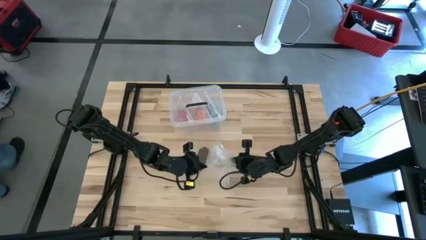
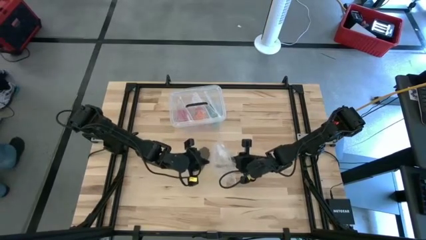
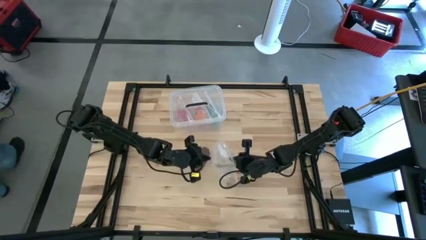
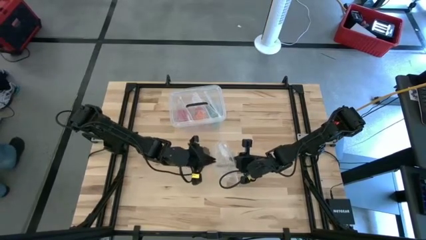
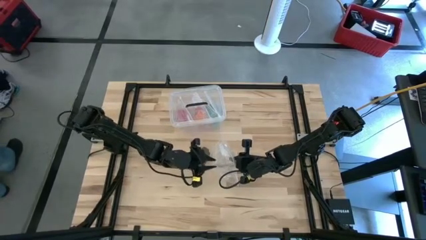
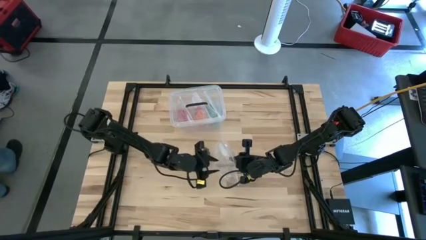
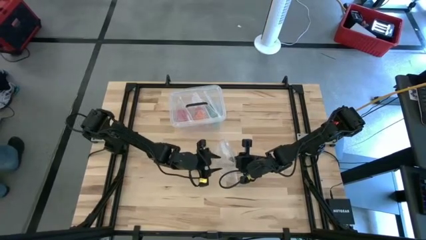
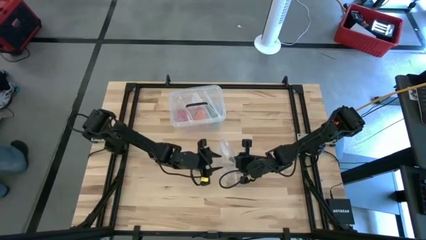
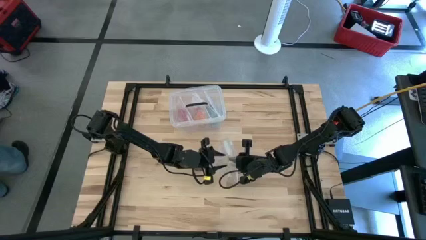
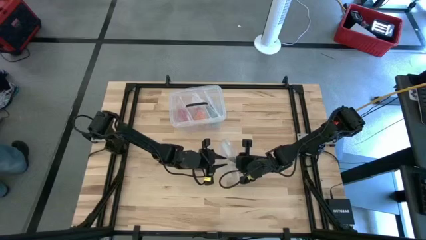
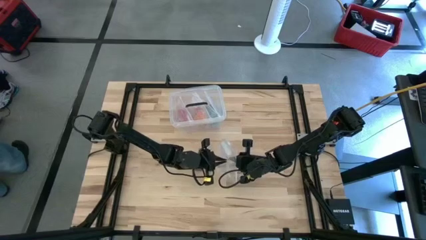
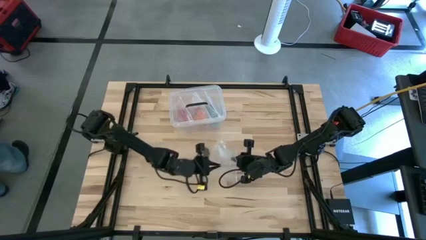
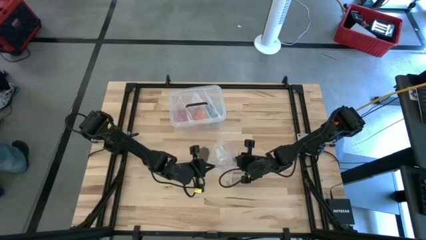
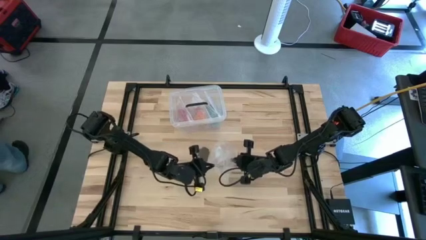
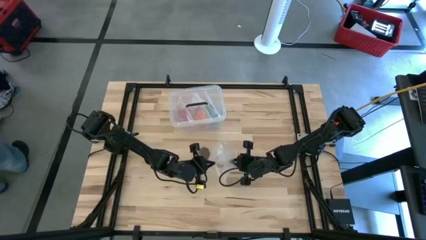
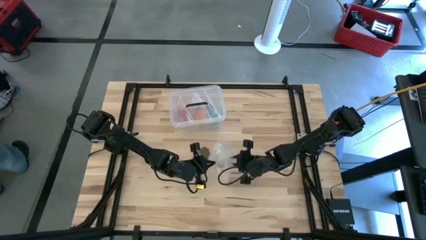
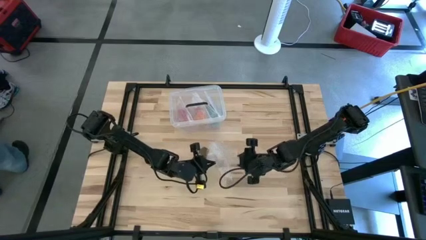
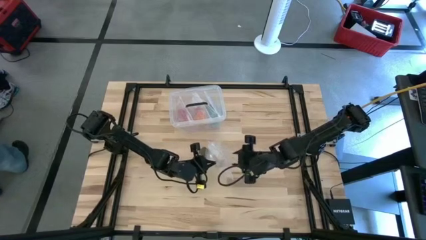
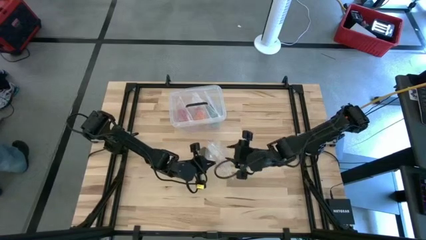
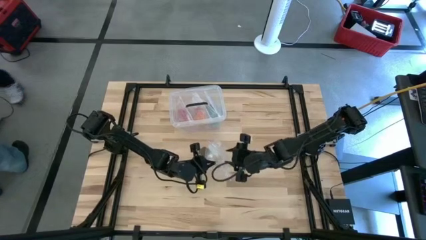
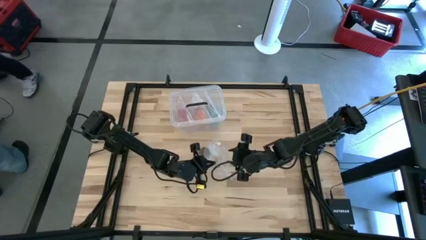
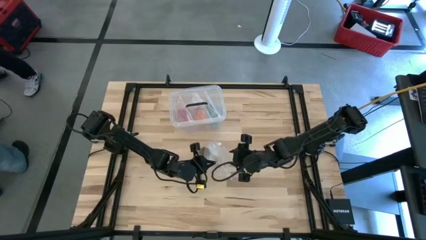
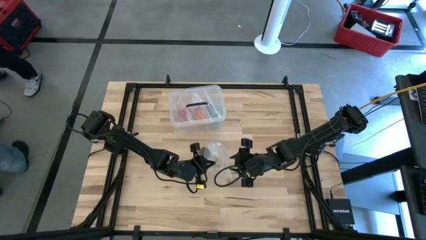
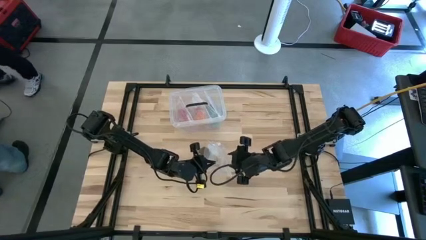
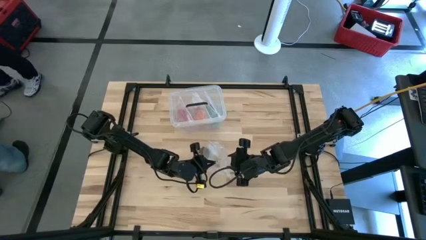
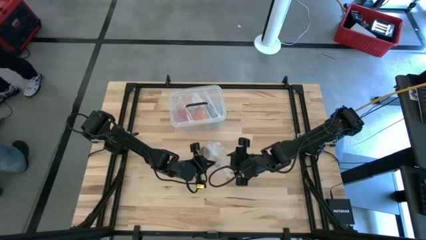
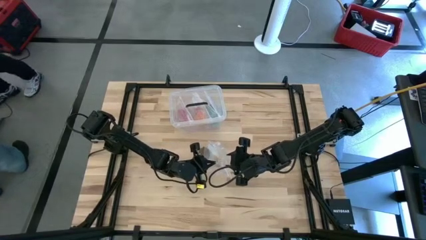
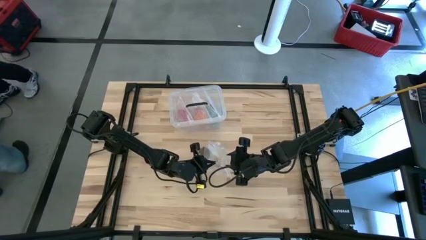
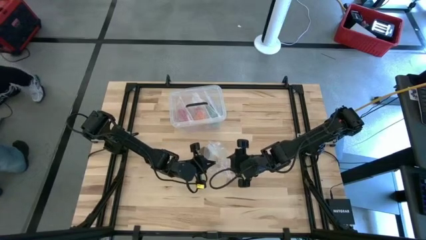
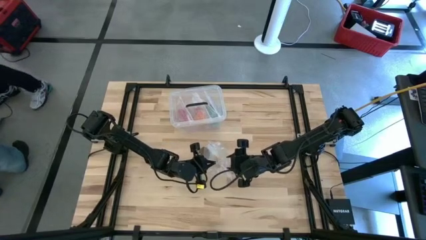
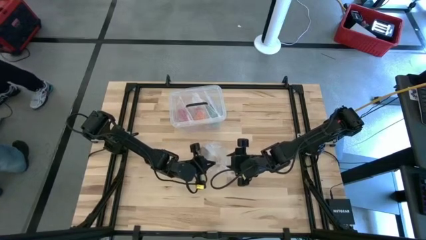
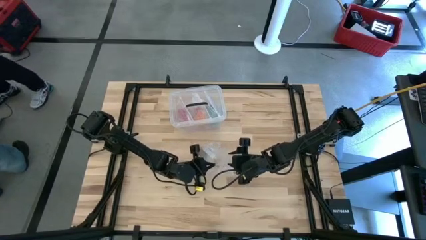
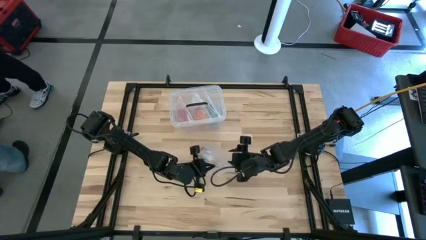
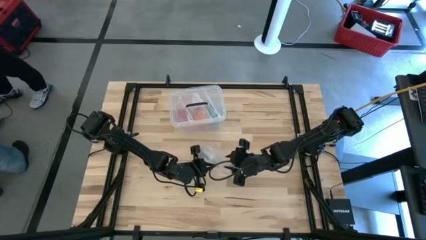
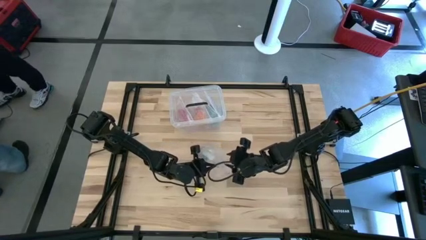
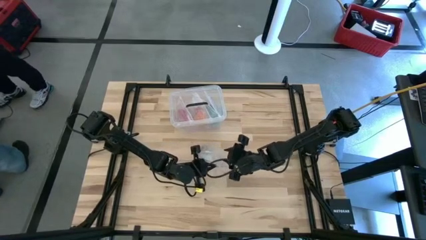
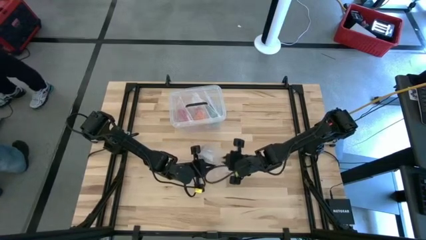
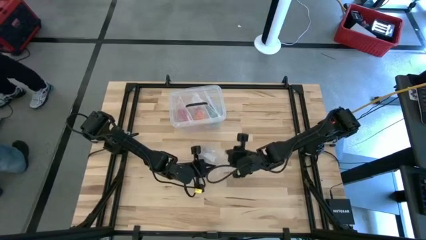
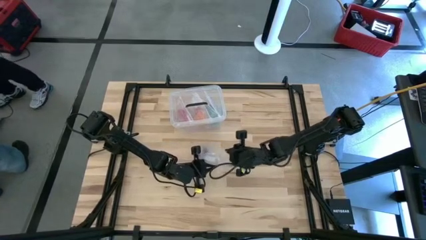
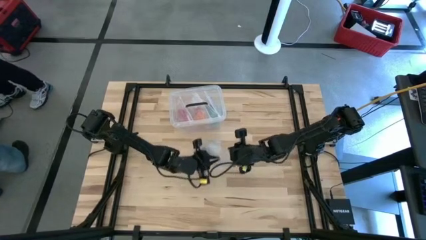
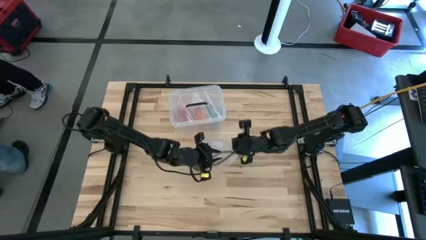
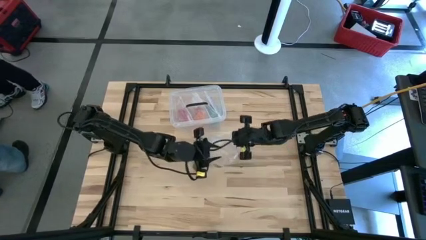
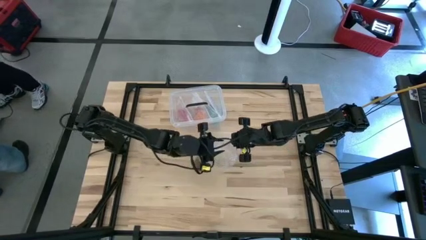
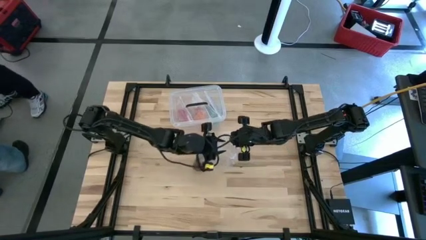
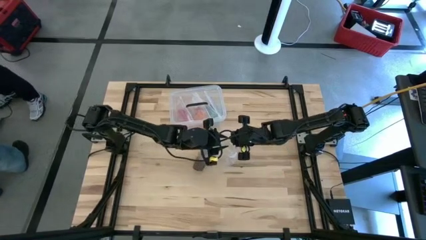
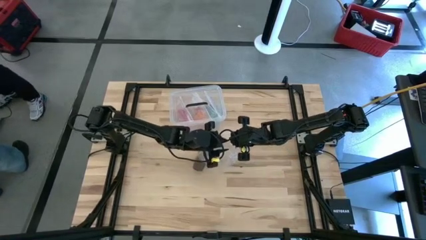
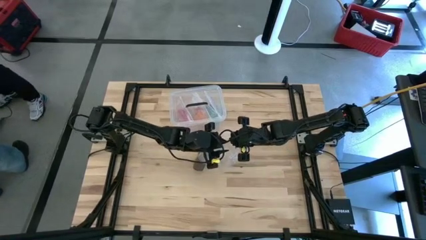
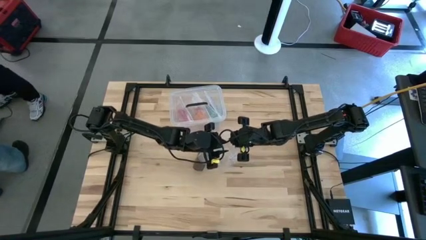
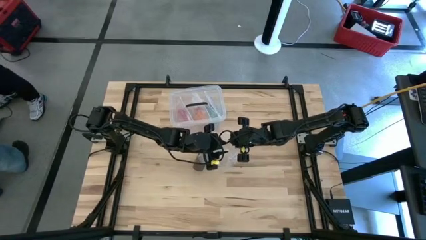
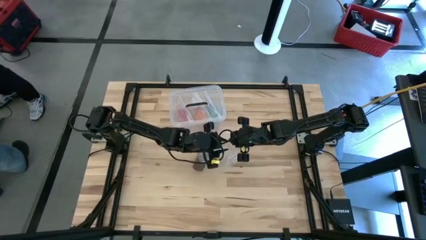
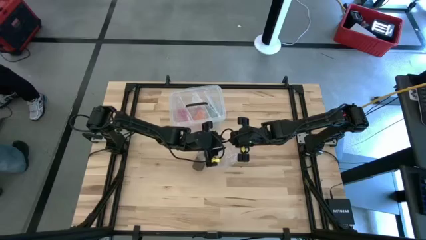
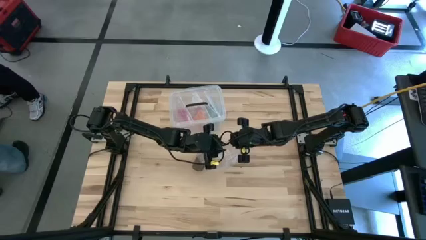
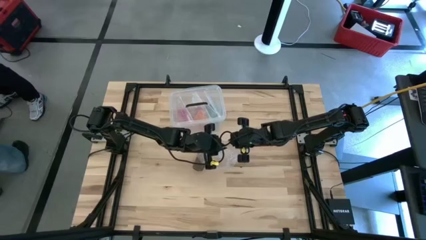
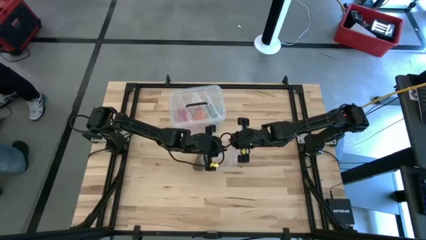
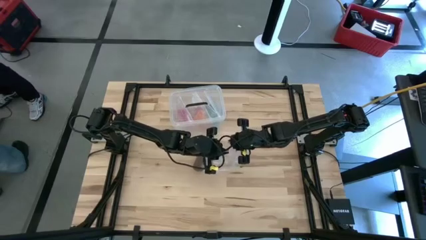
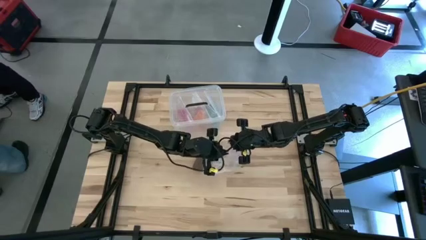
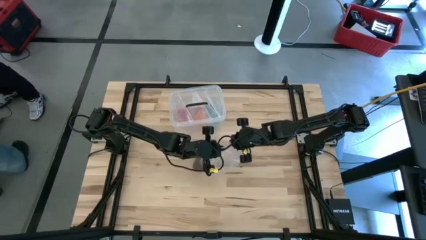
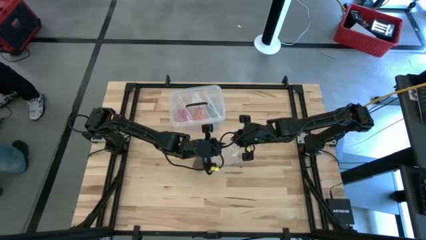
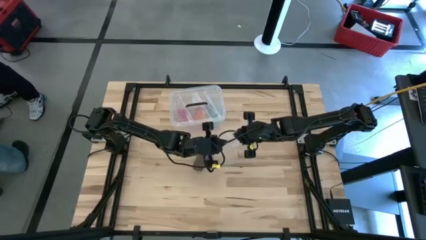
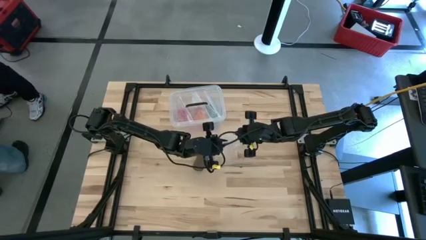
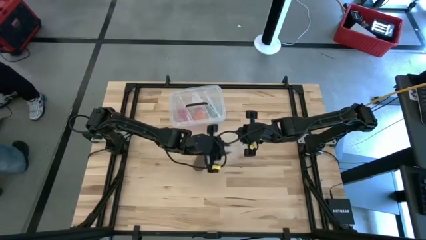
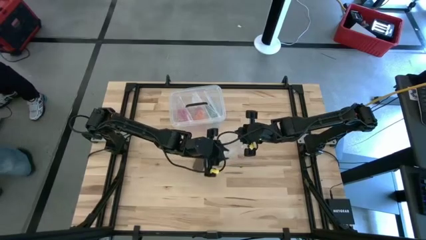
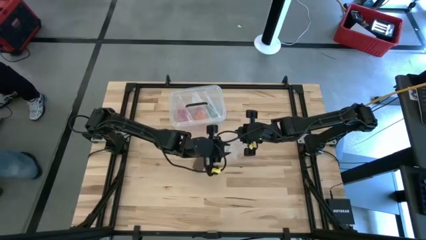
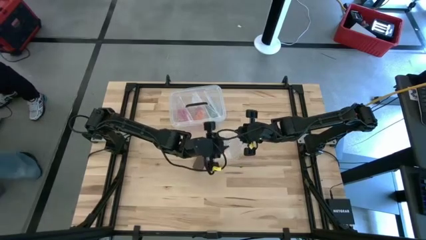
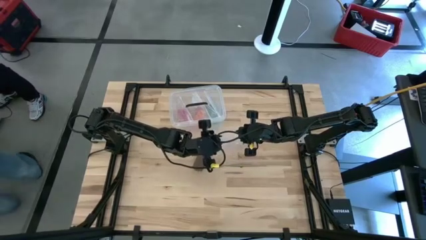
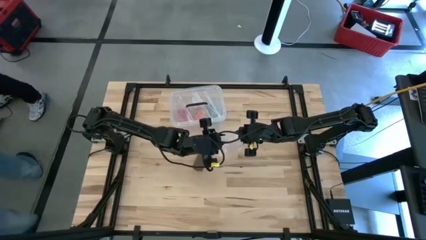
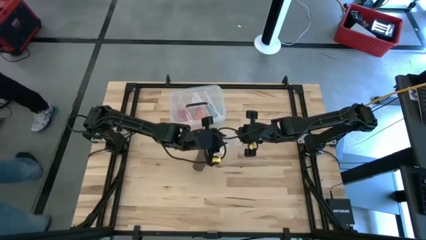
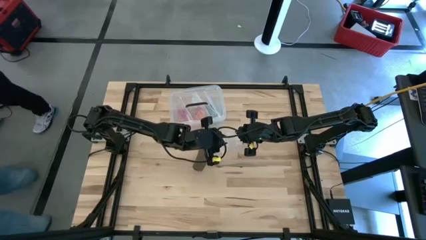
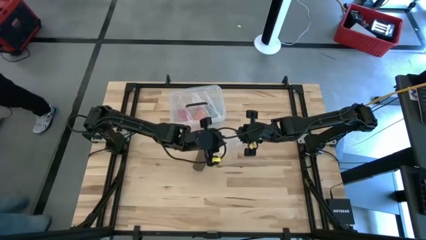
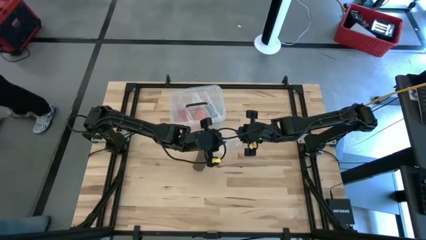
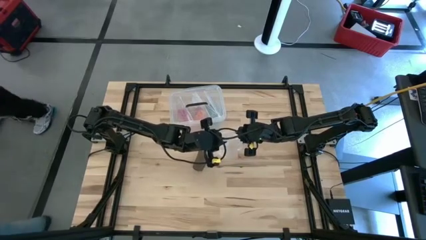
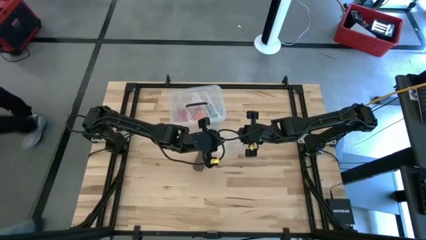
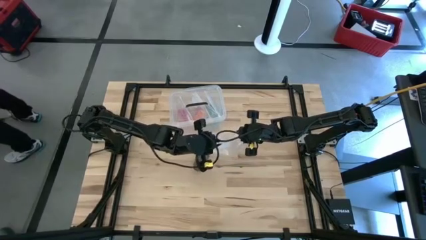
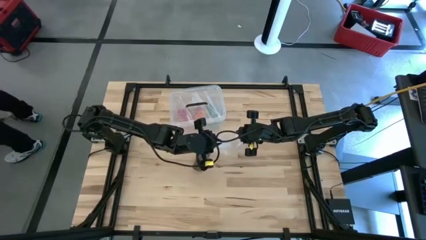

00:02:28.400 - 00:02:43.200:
Task: Roll bandage
Open the transparent zip bag

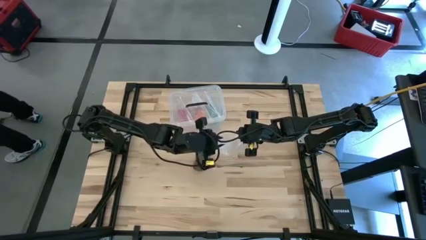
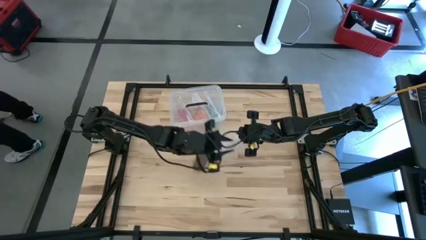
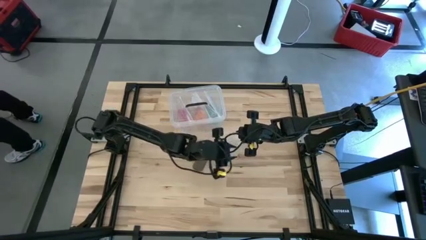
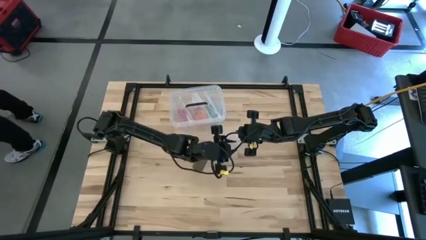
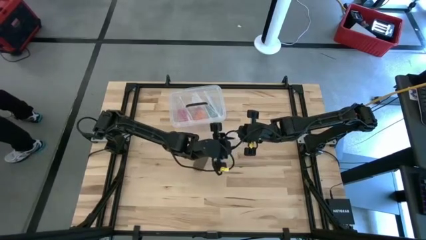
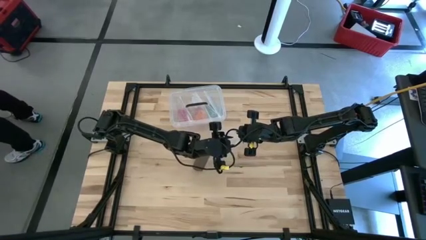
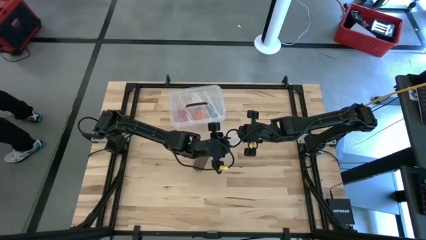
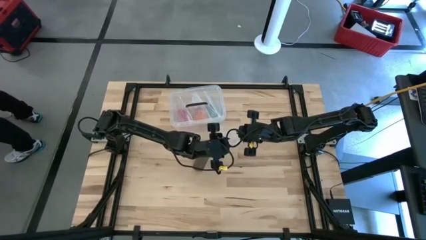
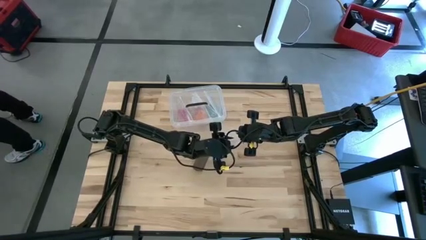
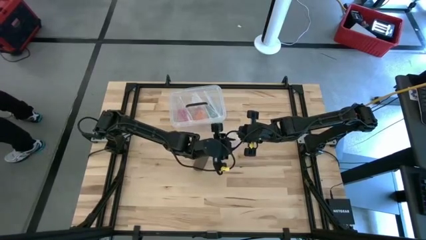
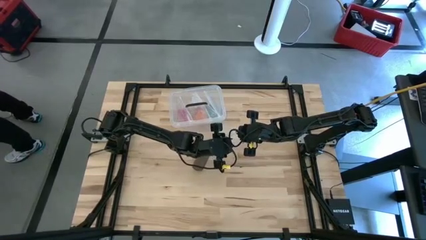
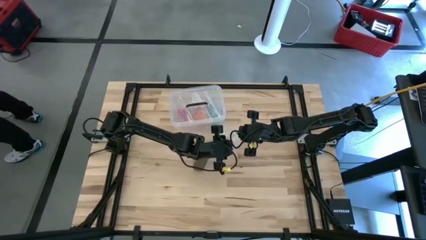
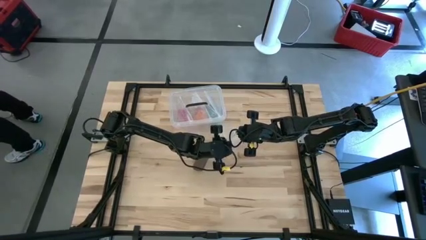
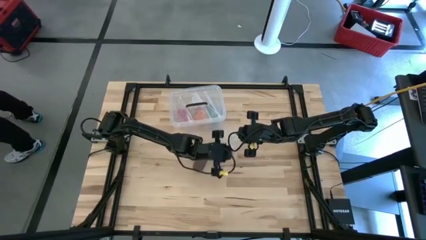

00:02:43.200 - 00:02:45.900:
Open the transparent zip bag
